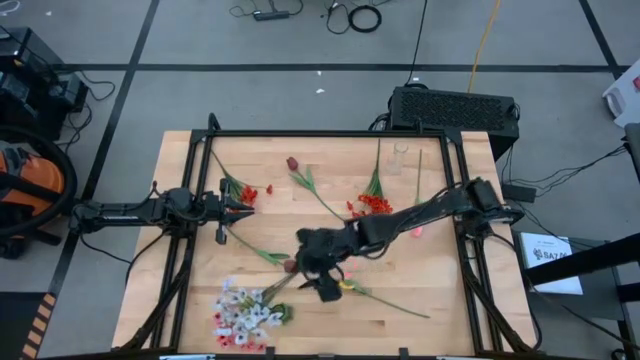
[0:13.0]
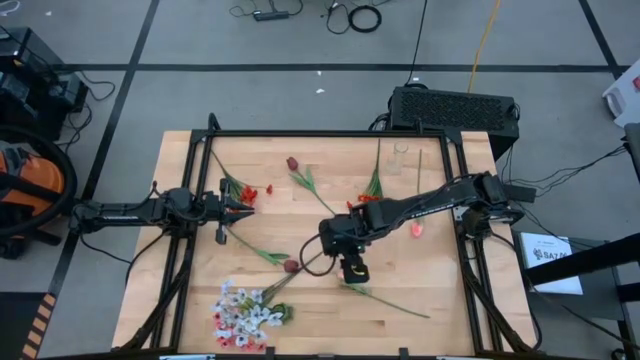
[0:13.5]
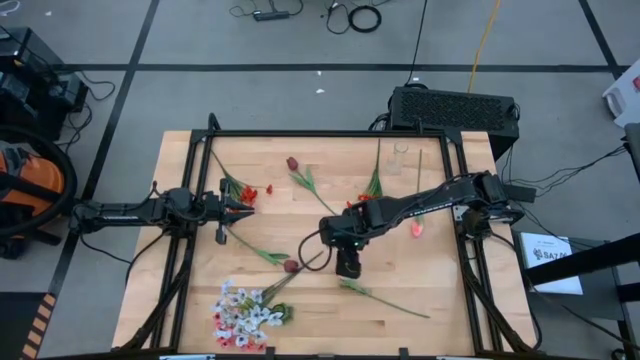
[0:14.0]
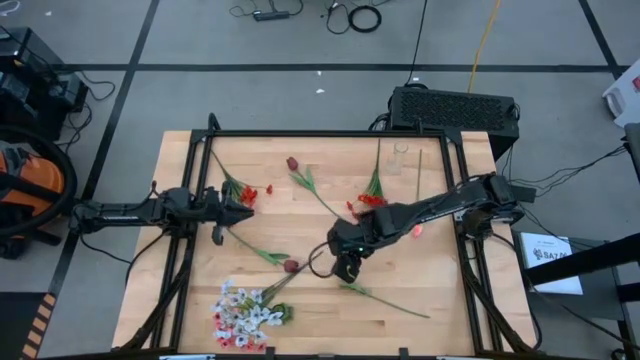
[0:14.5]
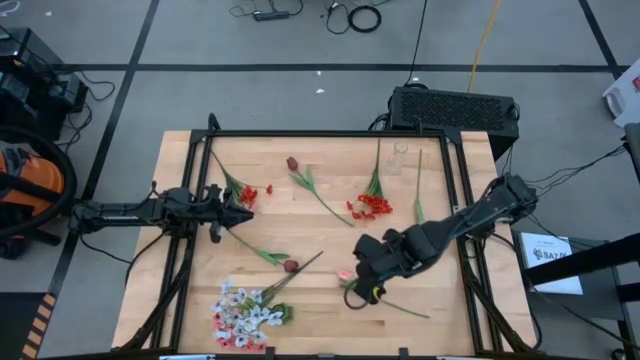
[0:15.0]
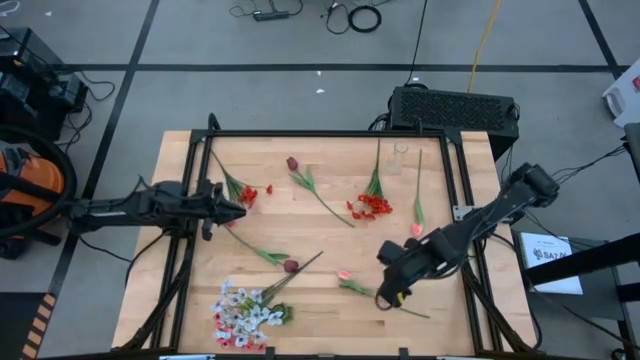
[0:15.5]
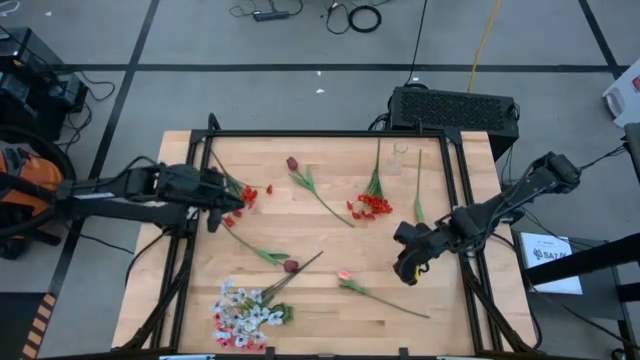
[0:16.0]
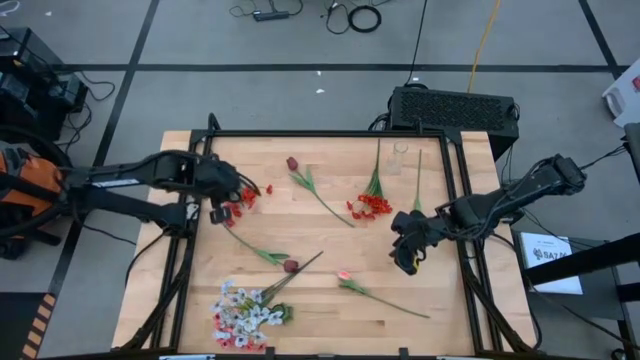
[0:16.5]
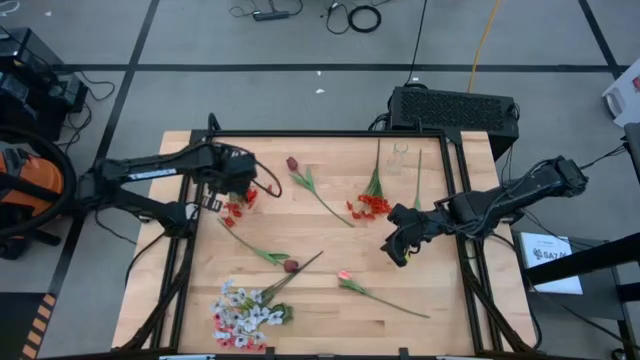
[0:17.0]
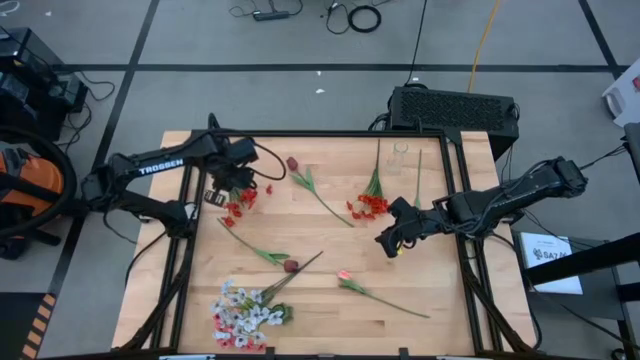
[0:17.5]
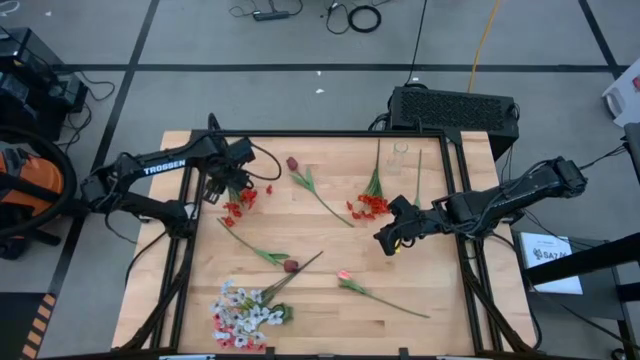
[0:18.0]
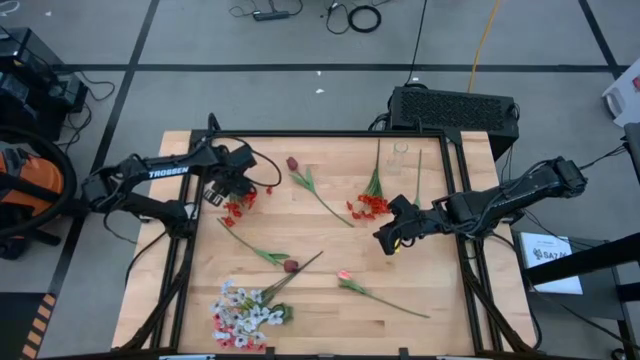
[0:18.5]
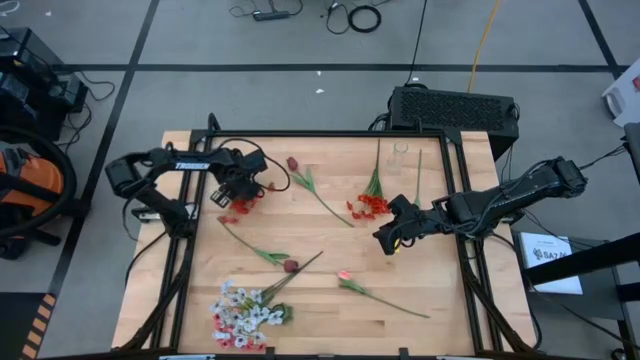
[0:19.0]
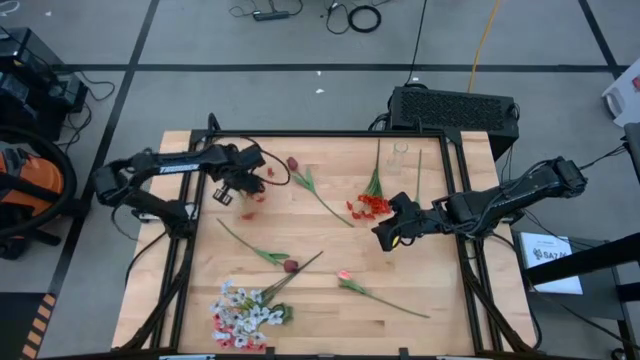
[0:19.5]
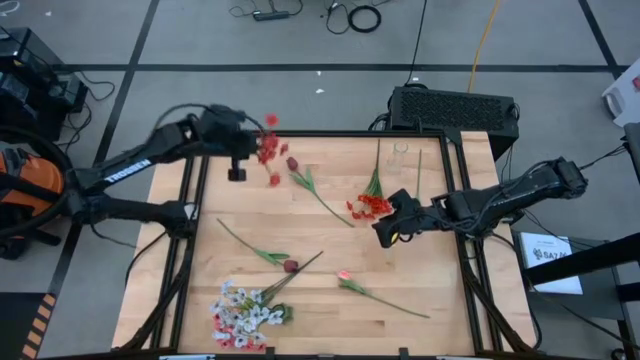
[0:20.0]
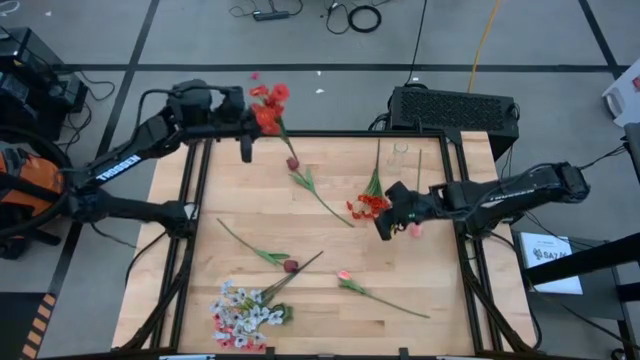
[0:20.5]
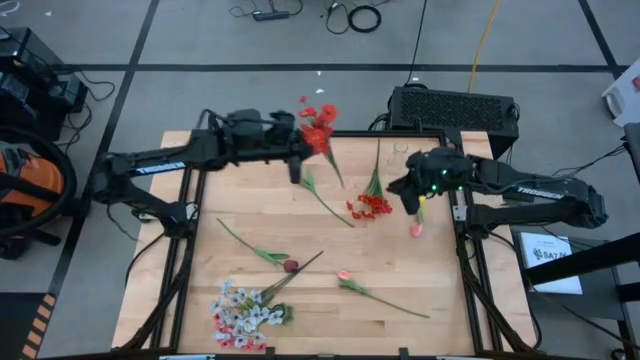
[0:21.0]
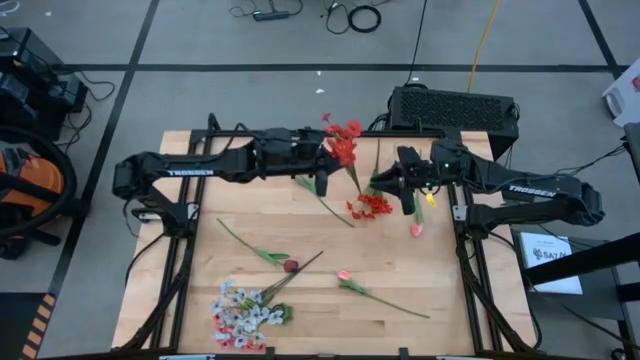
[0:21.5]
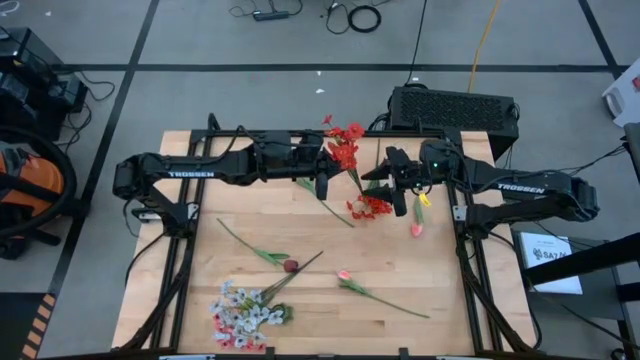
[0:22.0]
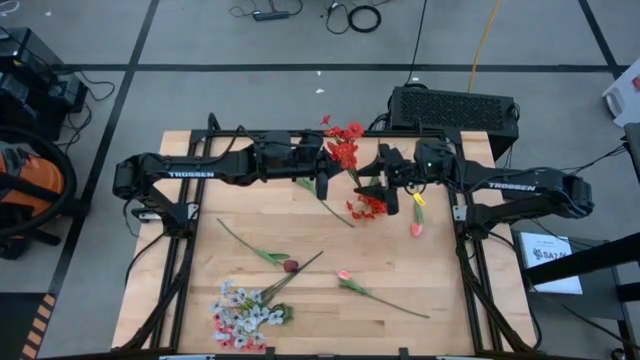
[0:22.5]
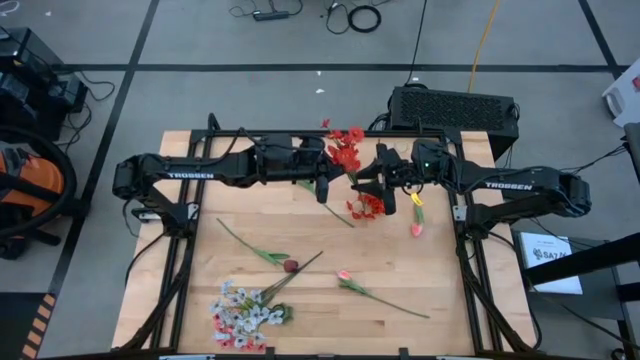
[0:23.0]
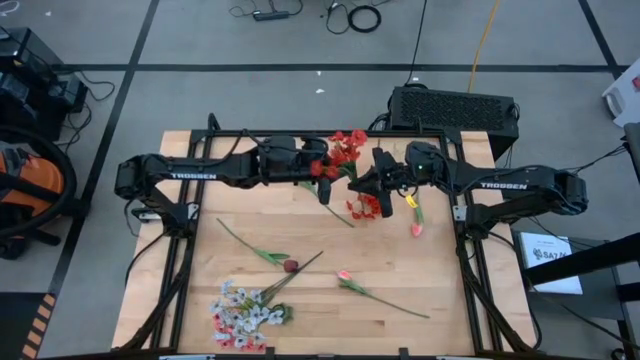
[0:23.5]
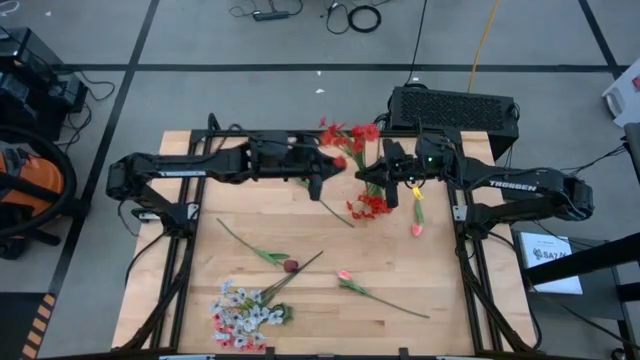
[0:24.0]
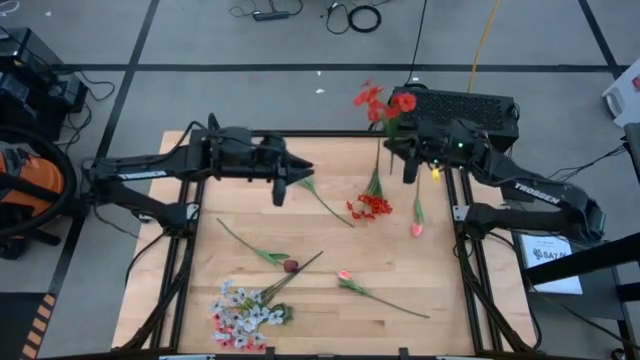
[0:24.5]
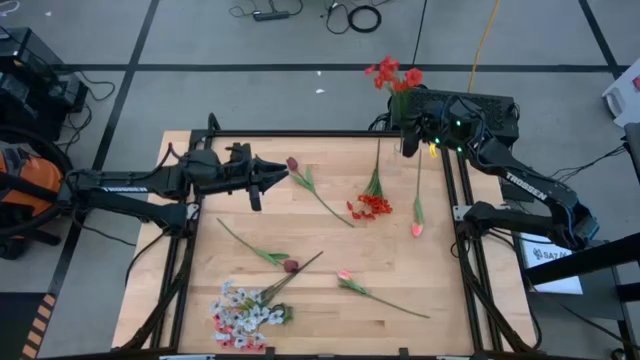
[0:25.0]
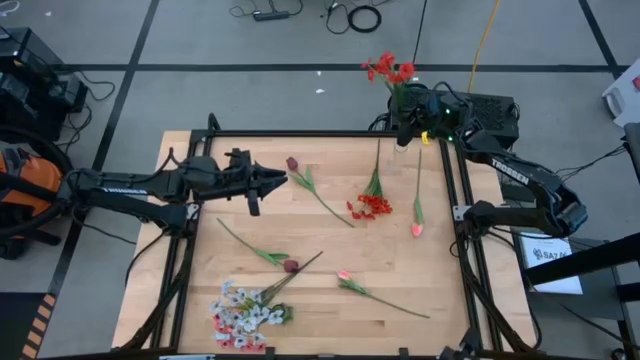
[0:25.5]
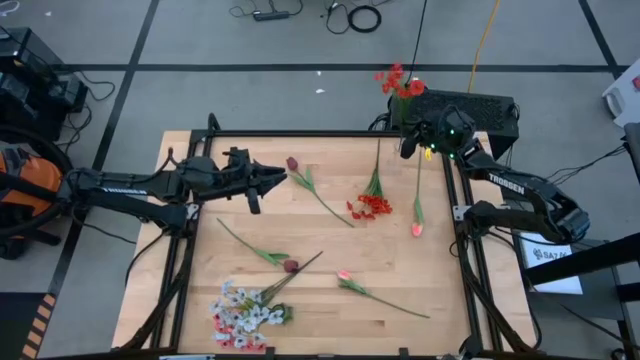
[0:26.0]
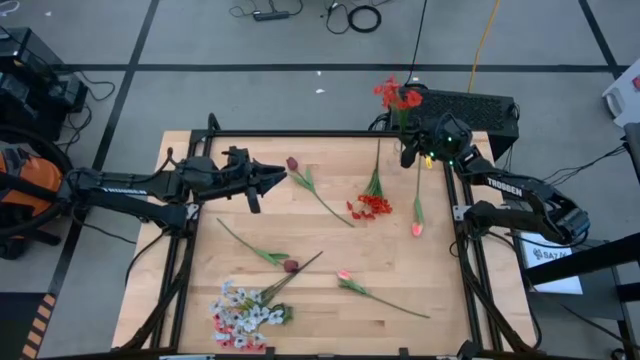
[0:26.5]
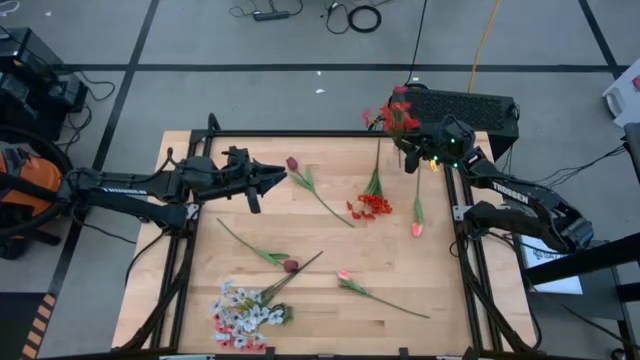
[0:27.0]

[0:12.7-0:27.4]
Task: Sort flowers into vase by color
Put the left orange flowers into the transparent vase

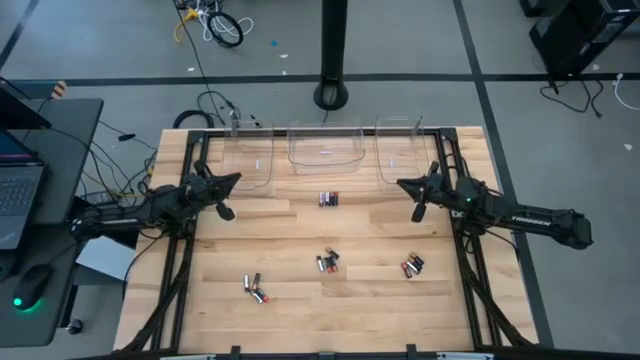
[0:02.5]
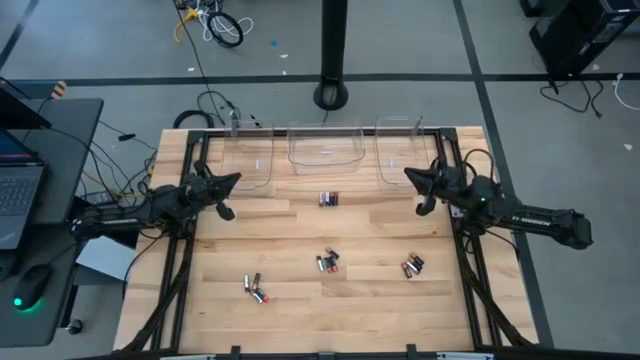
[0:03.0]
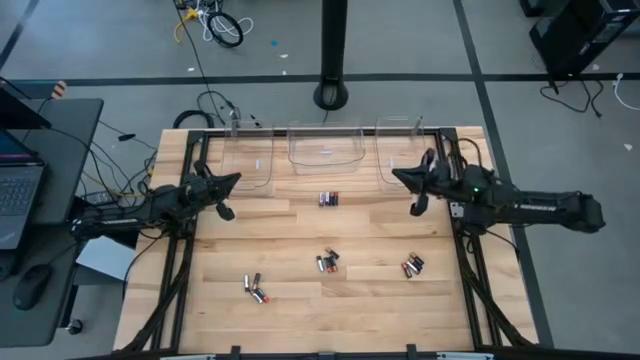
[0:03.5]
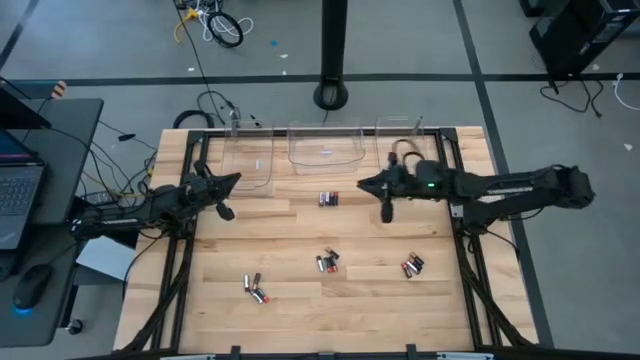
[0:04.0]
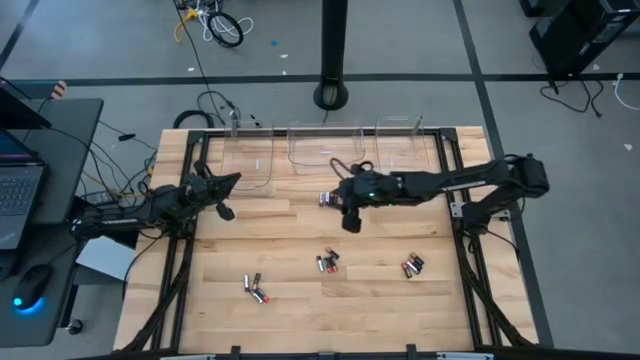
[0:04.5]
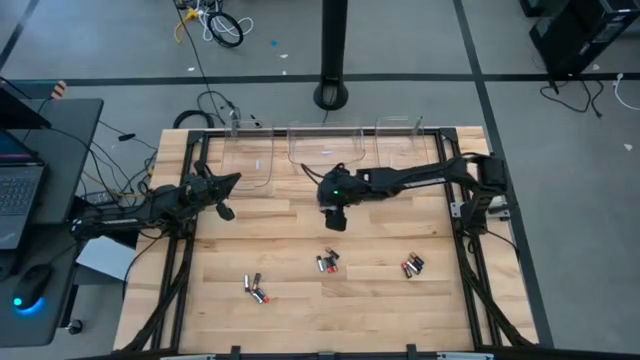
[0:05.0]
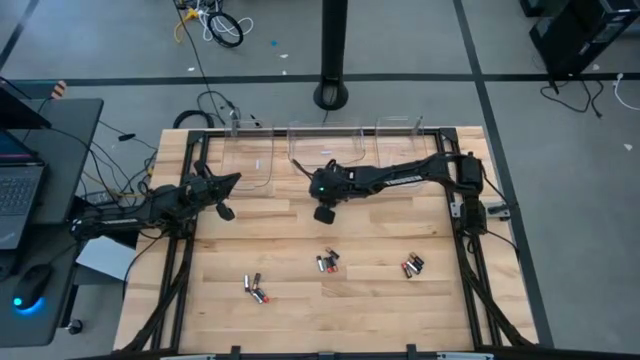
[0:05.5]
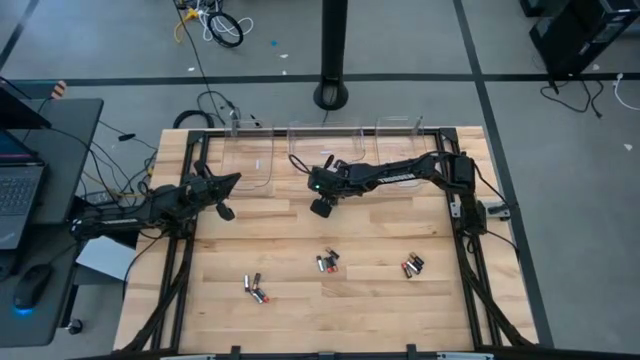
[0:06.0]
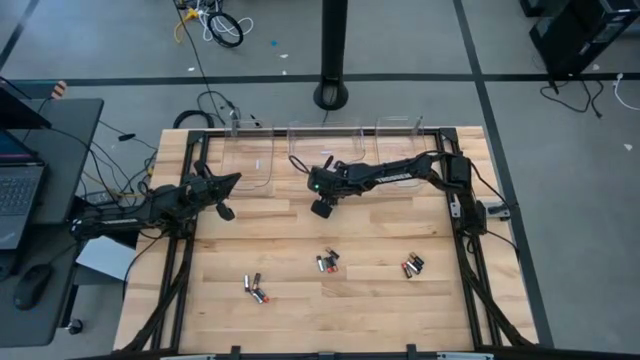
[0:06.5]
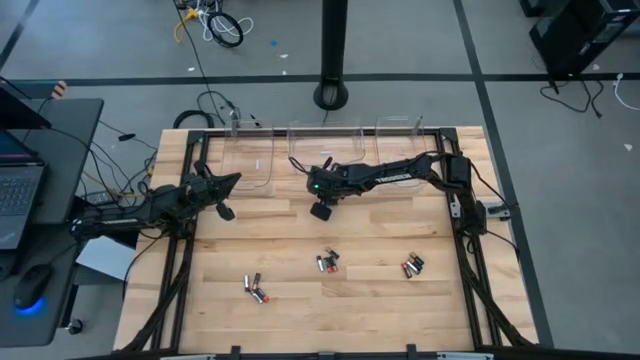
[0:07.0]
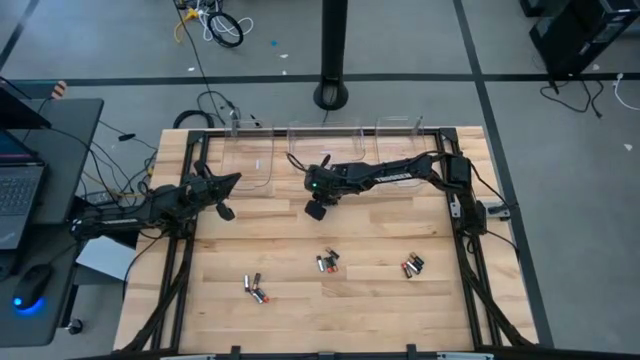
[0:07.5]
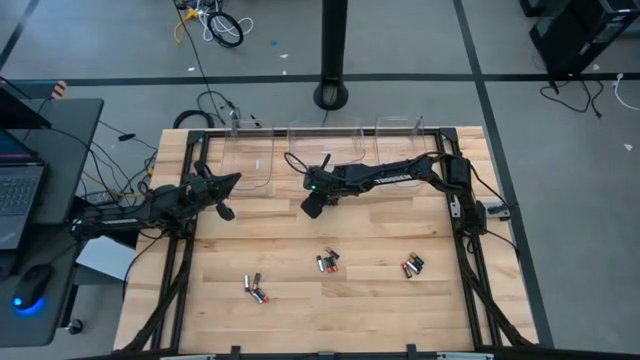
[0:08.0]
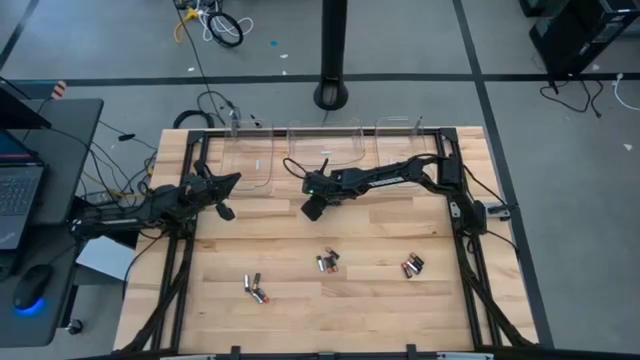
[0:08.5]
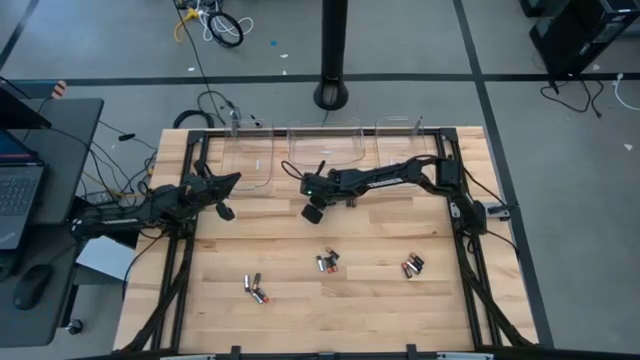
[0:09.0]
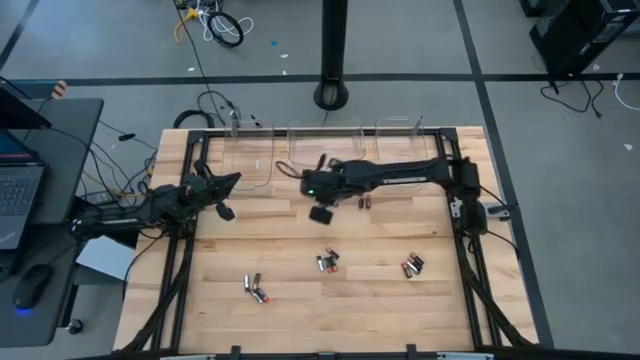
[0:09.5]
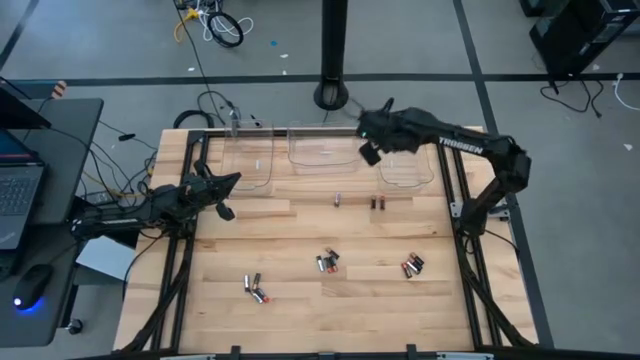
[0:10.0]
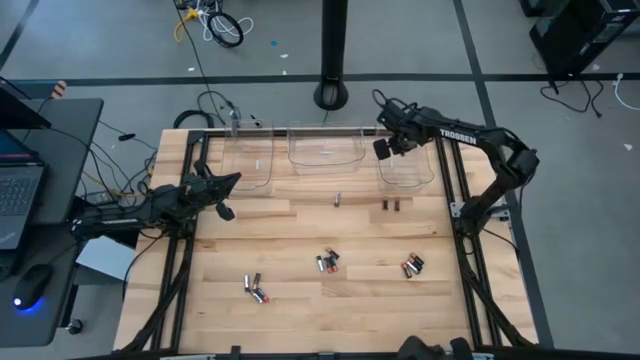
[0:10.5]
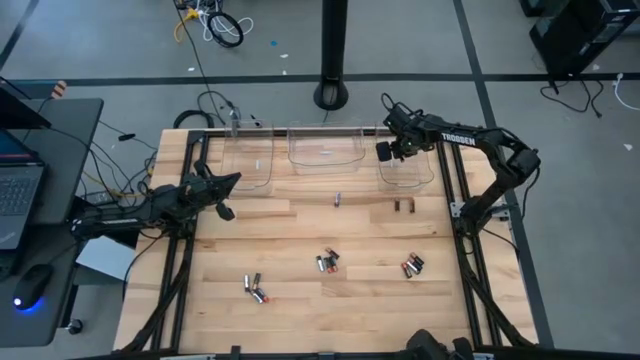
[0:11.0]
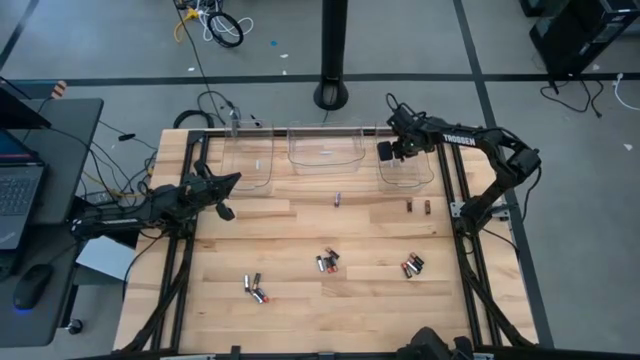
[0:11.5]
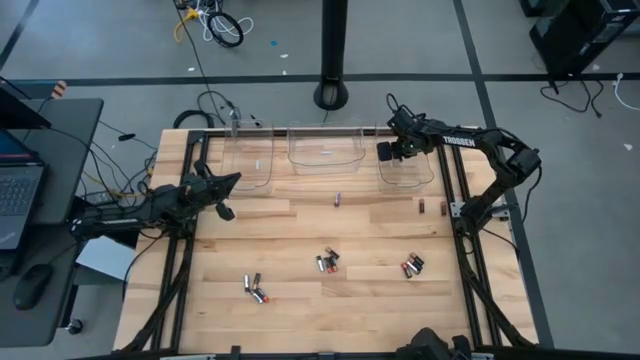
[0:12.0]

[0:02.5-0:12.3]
Task: Sort batteries
Put the silver battery into the right transparent bin
